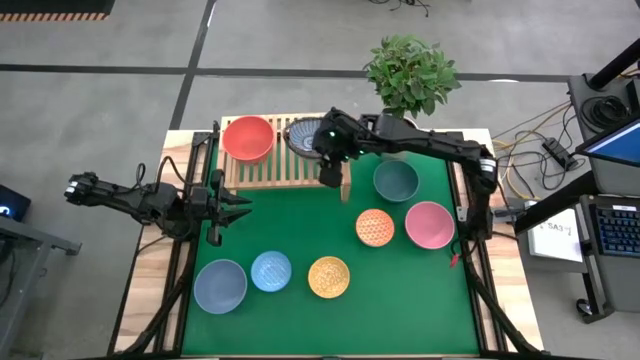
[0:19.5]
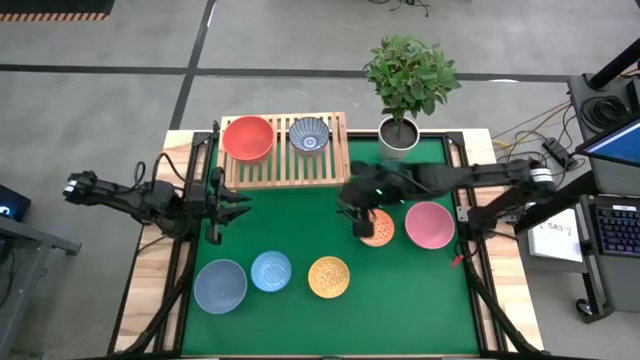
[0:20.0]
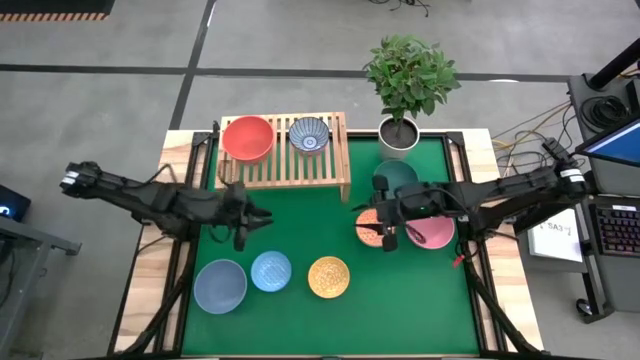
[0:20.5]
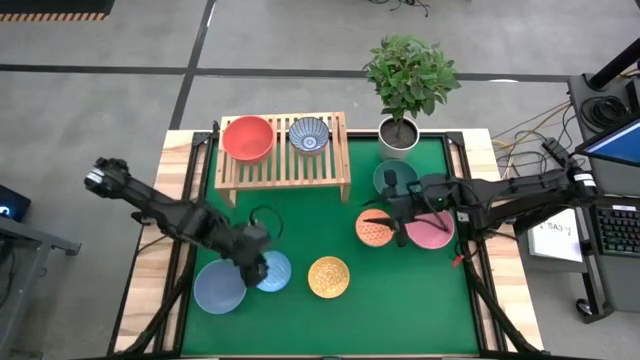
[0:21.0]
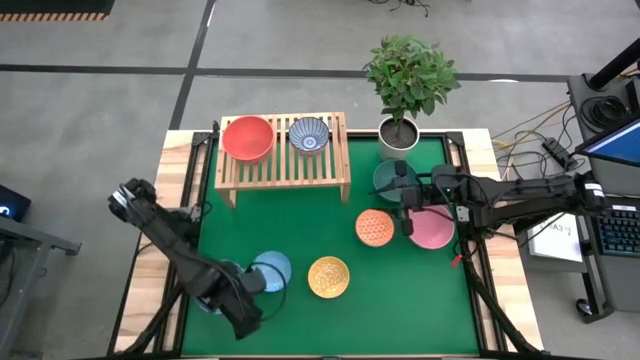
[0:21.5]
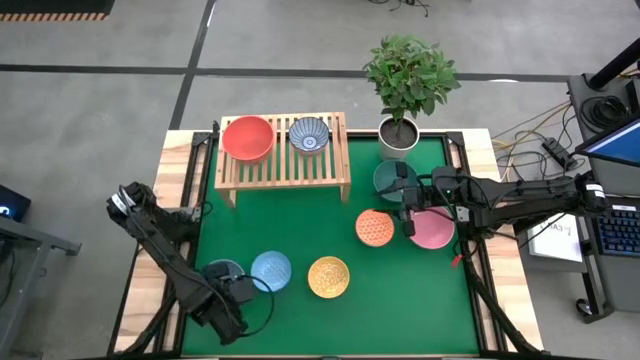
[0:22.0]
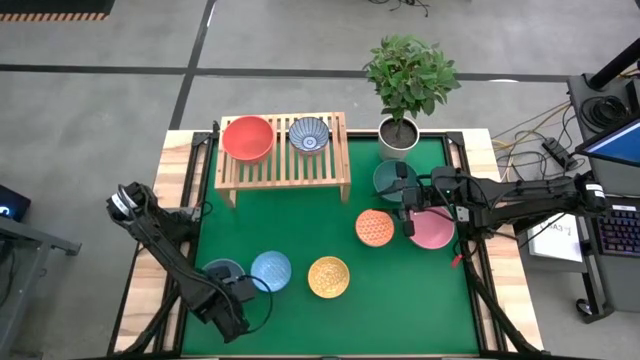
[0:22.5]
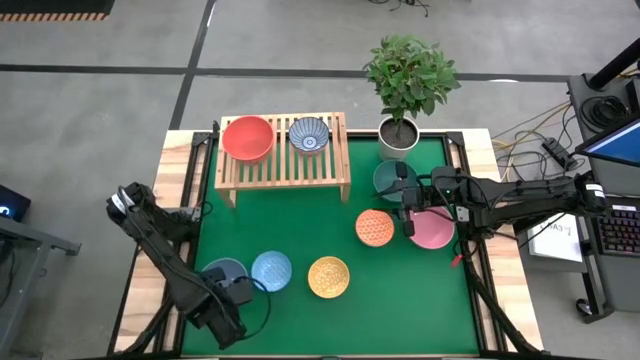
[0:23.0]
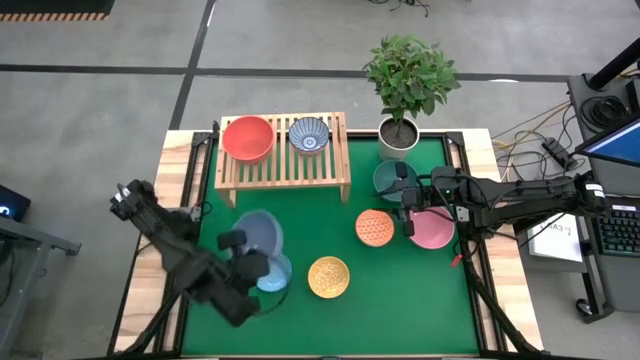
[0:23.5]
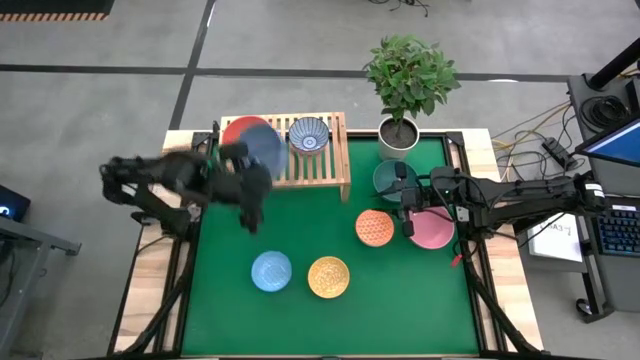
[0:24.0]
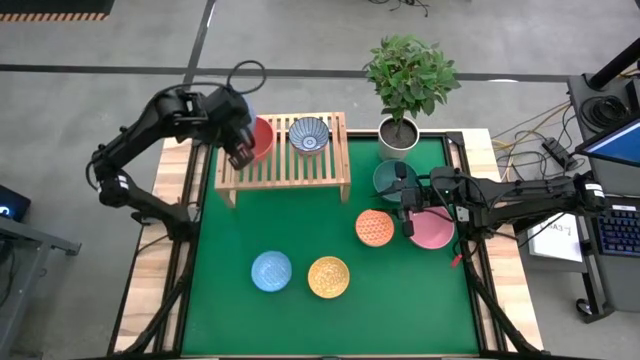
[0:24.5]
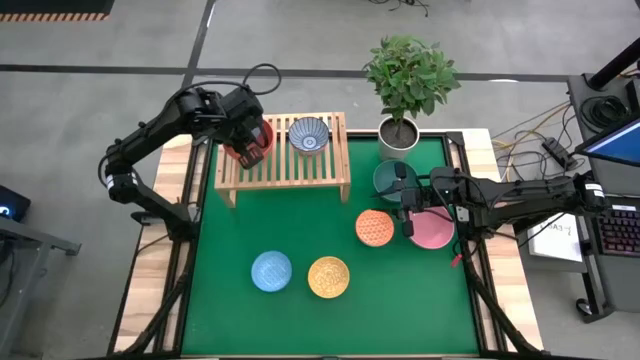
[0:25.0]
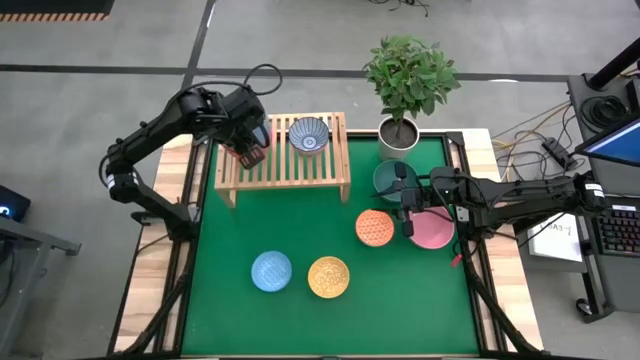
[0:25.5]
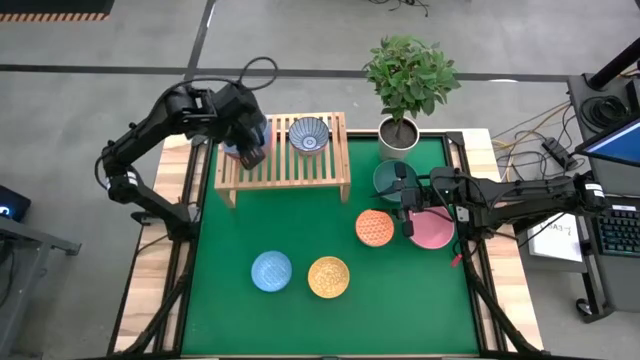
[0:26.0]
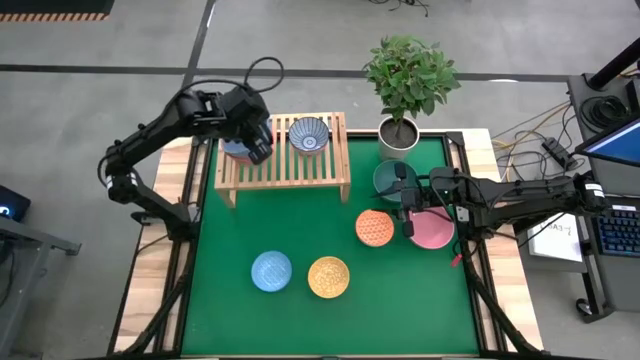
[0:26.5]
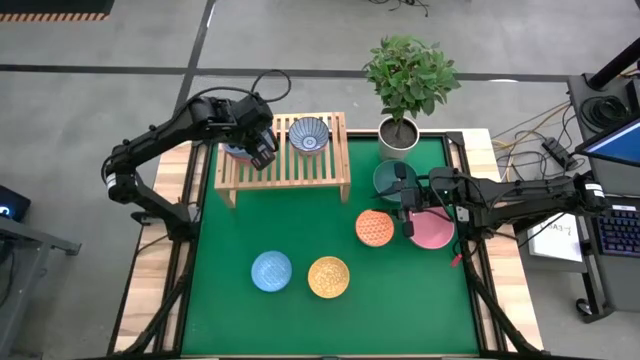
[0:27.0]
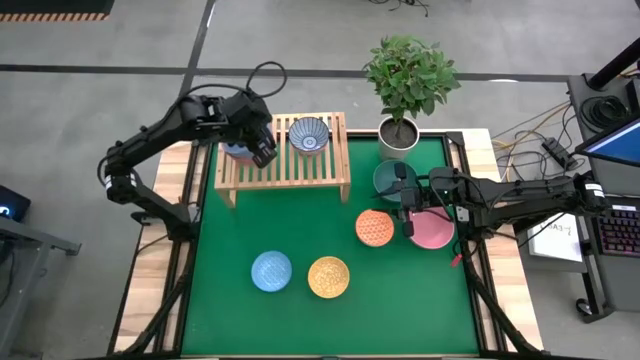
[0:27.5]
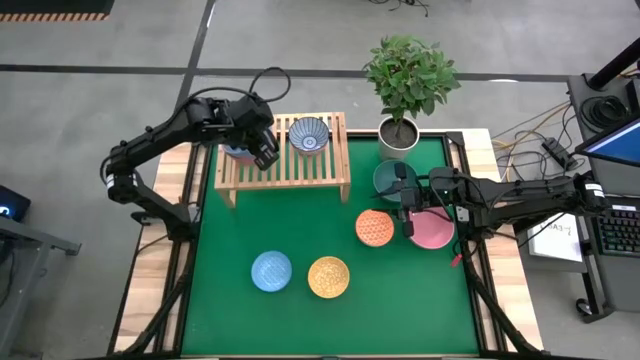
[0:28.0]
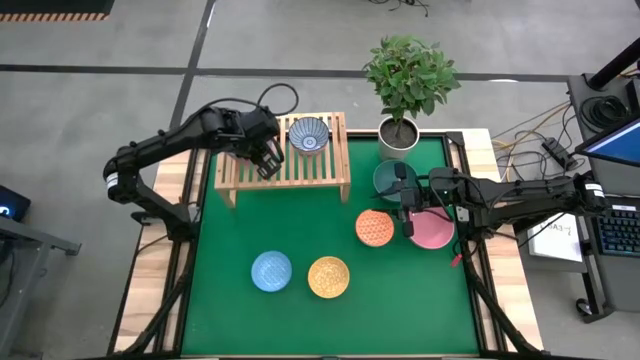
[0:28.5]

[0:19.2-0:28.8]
Task: Place and stack bowls onto a shelf
Stack the blue bowl in the orange bowl on the shelf

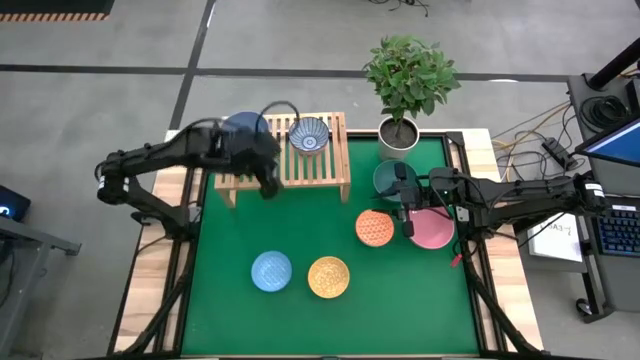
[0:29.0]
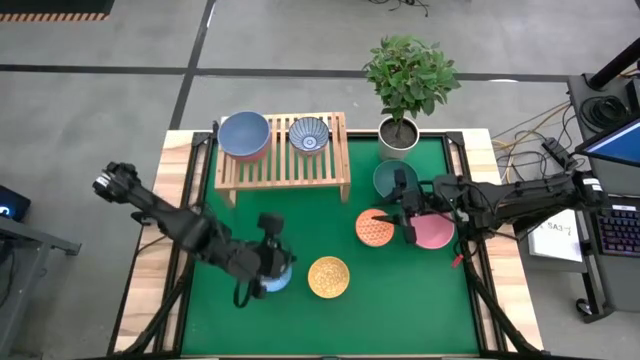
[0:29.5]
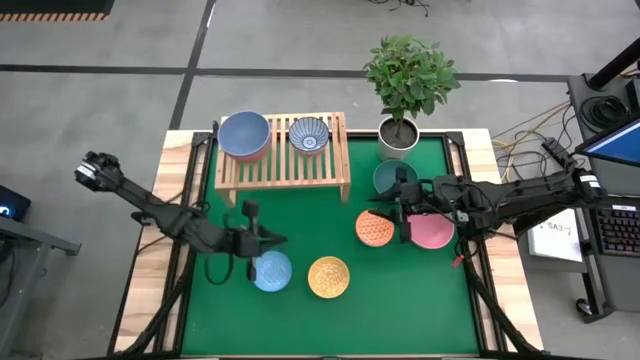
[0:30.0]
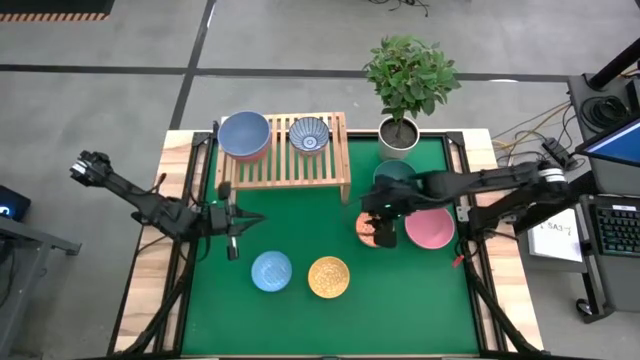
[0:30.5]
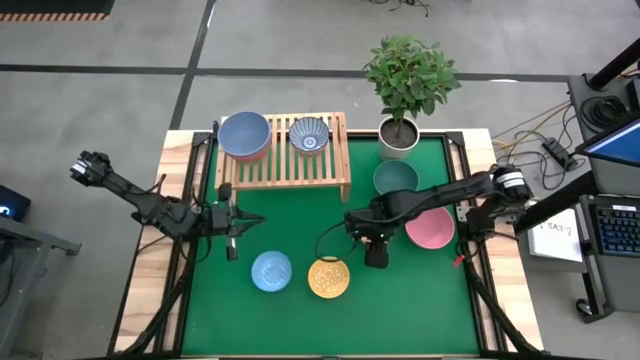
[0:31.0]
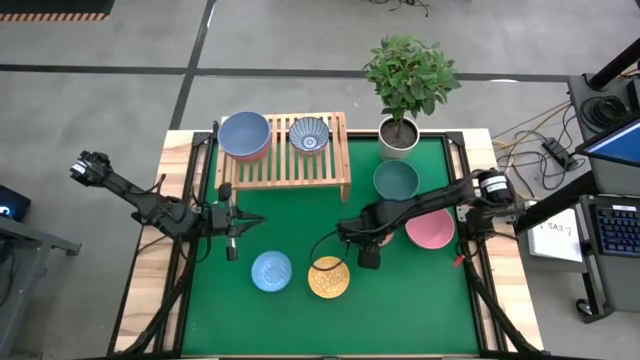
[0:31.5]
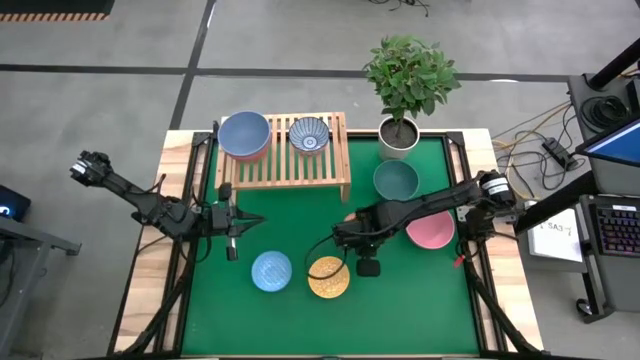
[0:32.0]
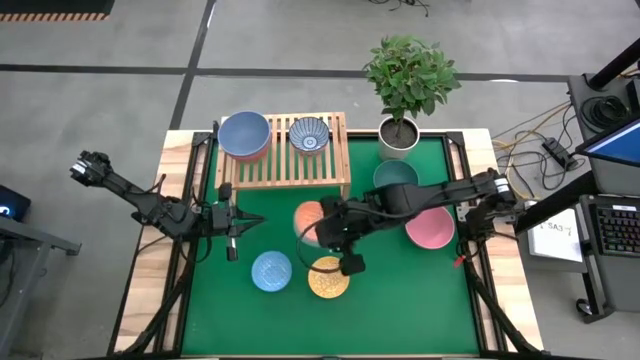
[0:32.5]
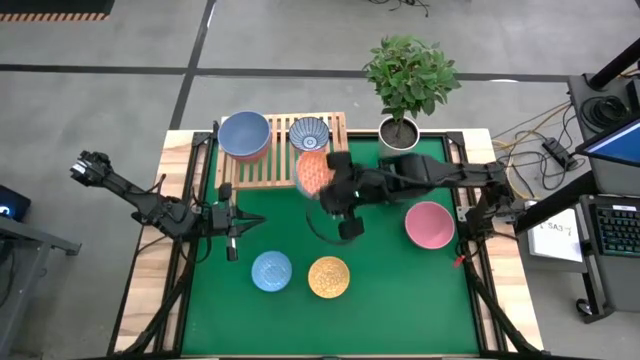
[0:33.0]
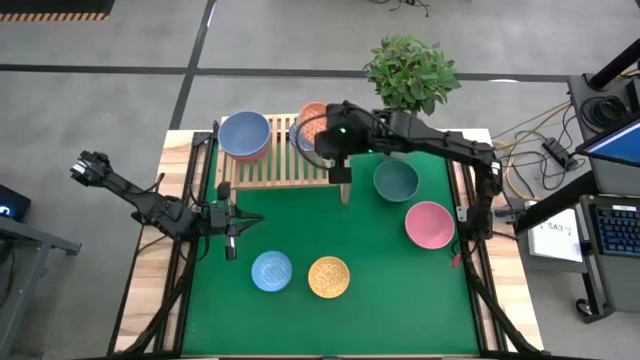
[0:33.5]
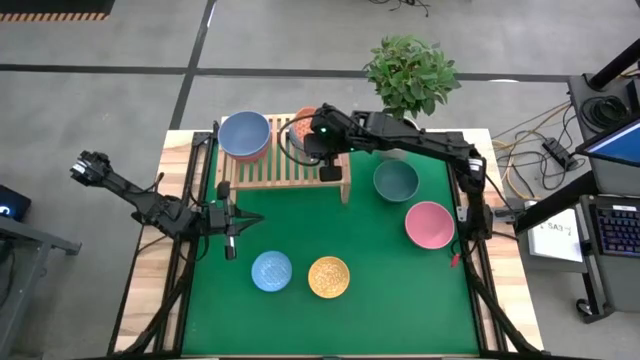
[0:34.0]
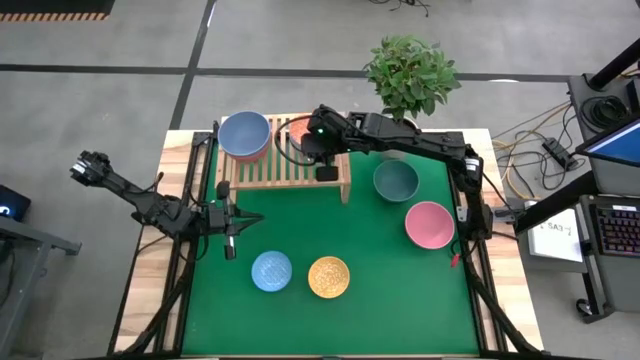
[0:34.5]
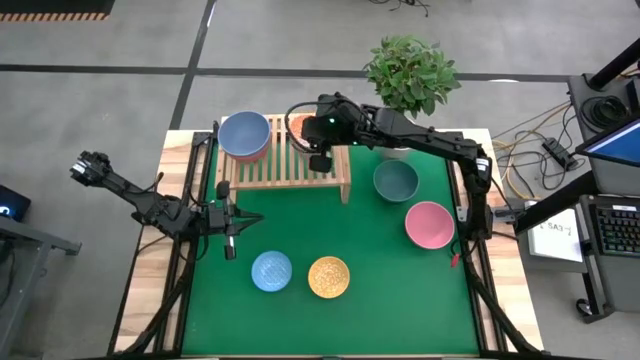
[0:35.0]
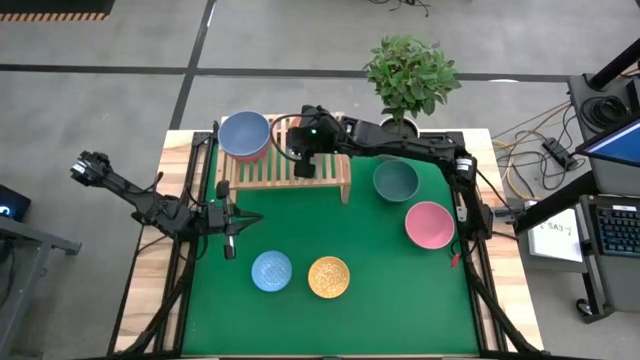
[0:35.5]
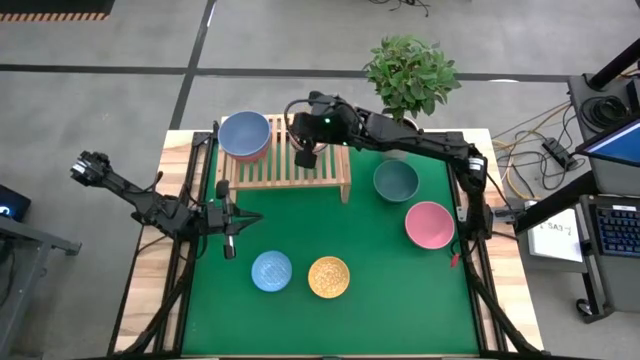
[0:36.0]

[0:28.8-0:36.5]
Stack the orange and blue patterned bowl in the blue and red patterned bowl on the shelf

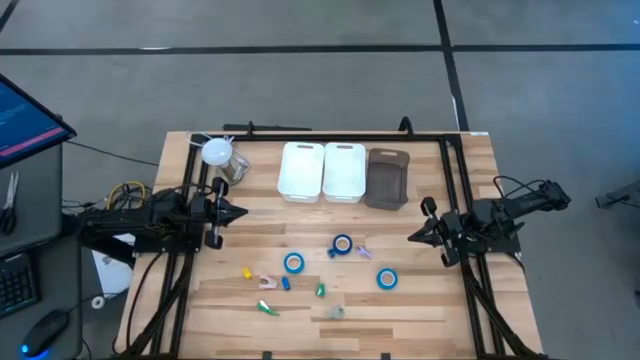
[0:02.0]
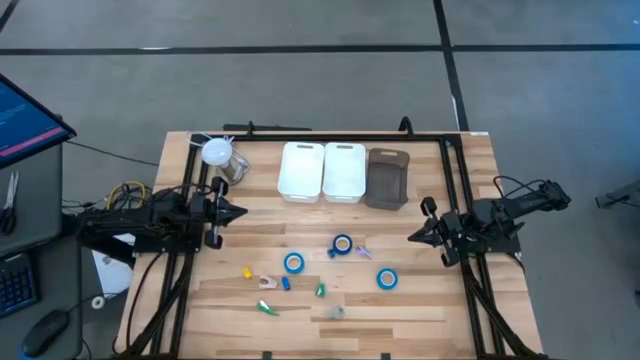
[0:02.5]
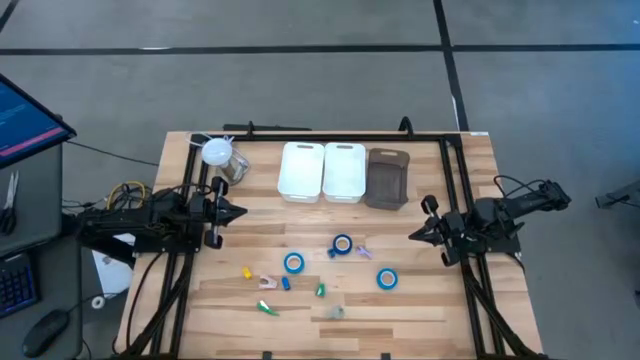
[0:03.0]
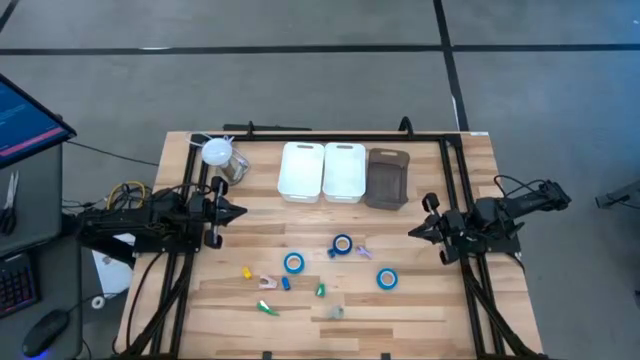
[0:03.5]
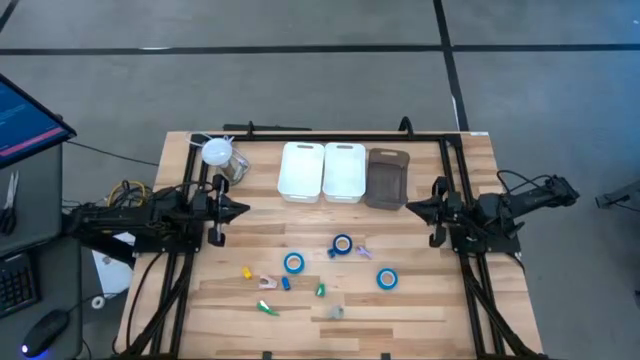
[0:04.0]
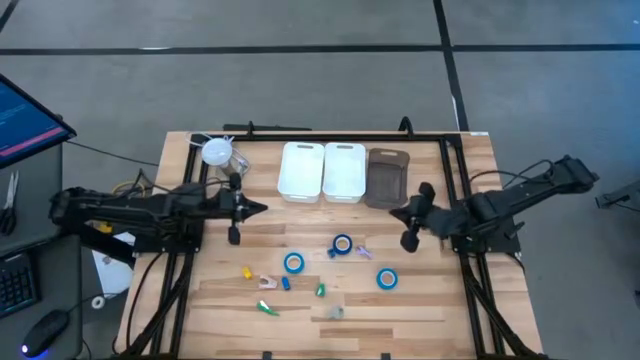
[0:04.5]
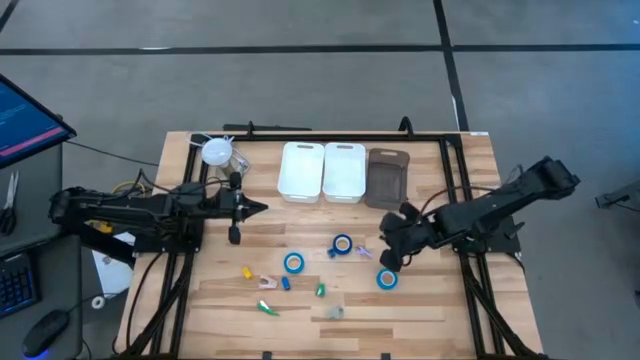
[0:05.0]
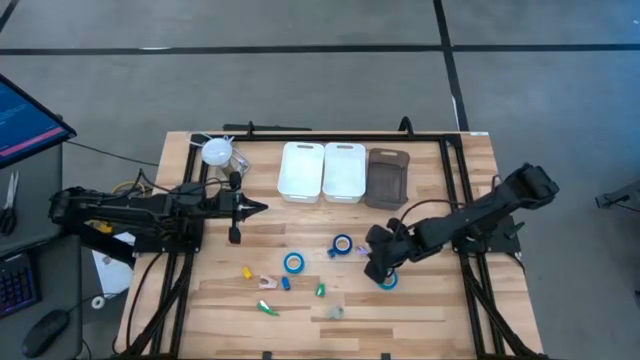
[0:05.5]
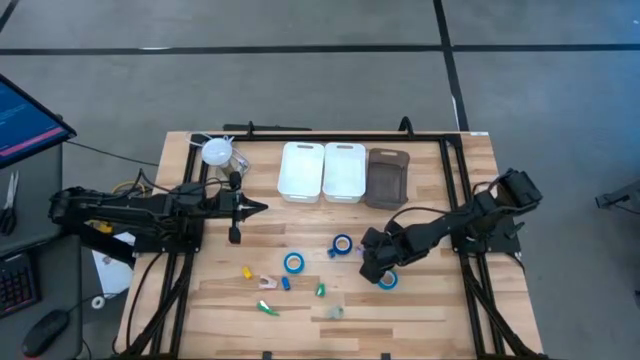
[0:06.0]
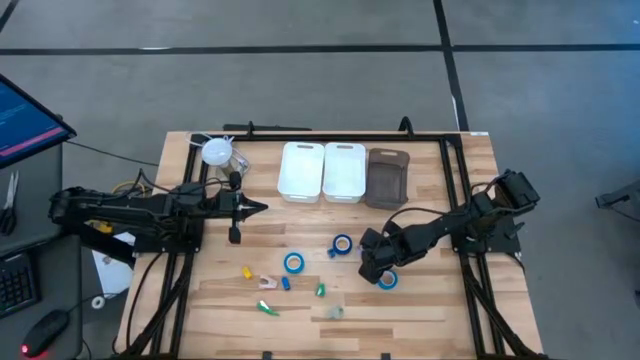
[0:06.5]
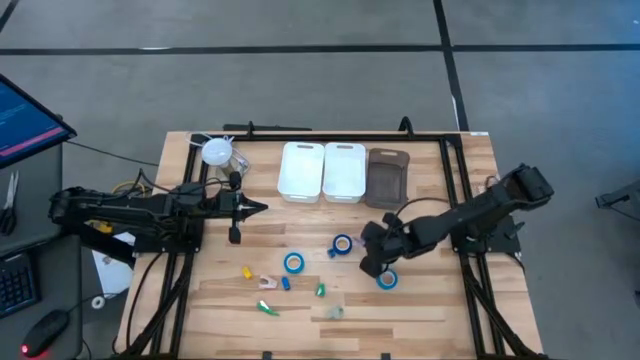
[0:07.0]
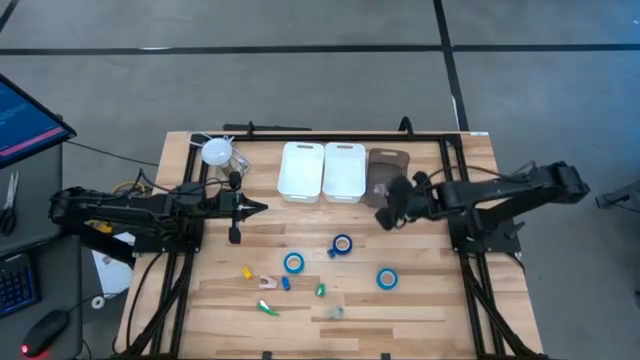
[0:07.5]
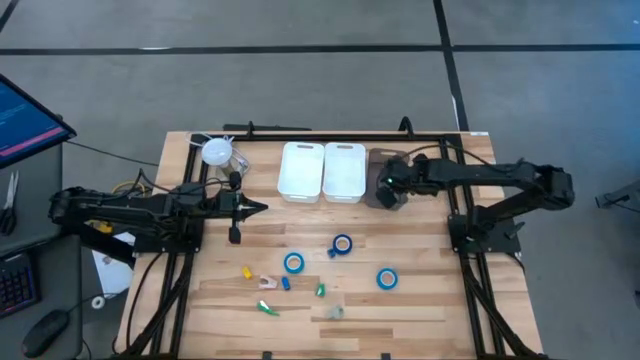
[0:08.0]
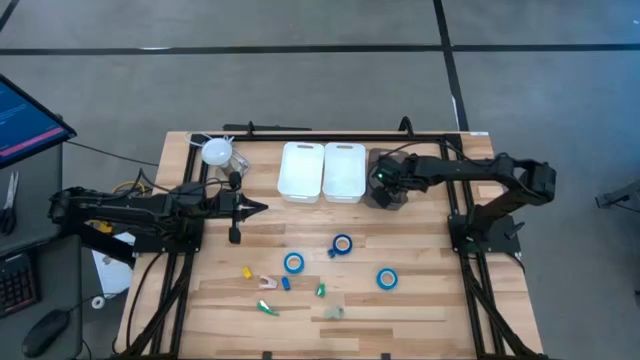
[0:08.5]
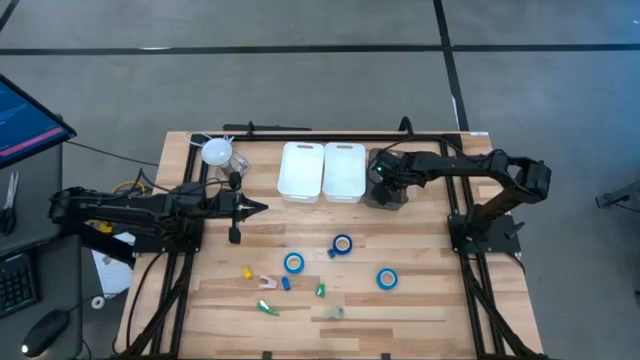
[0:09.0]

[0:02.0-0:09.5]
Task: Pick and place Stapler, Stapler remover, tape
Put the purple staple remover into the black bin
